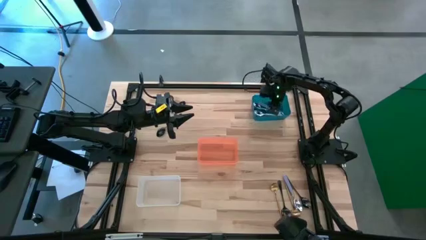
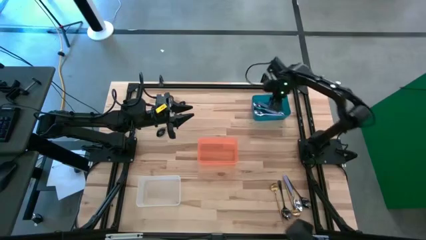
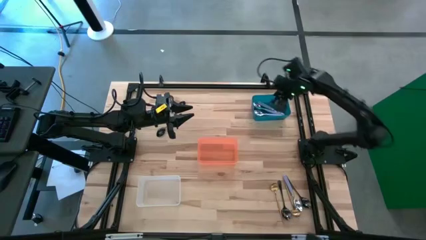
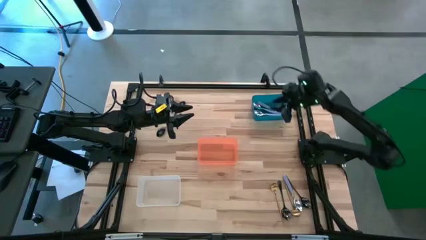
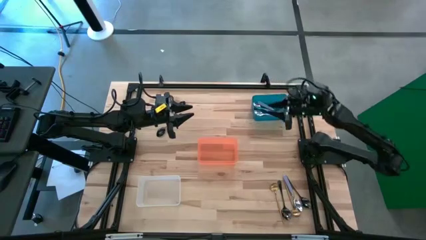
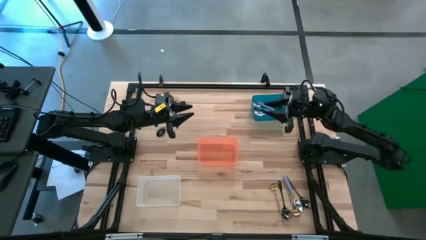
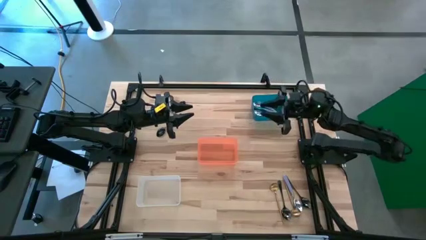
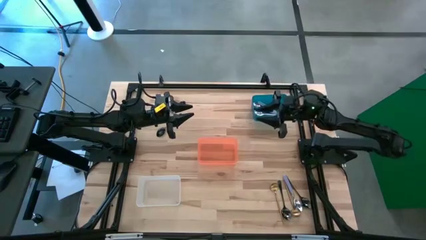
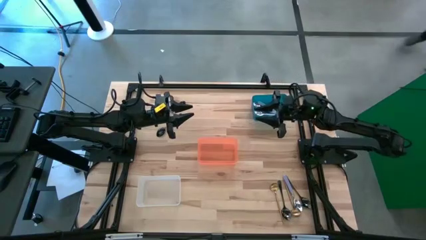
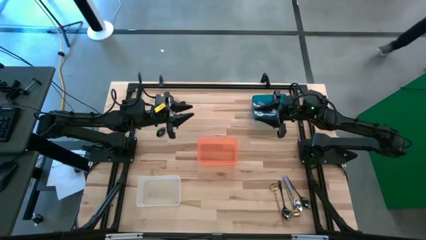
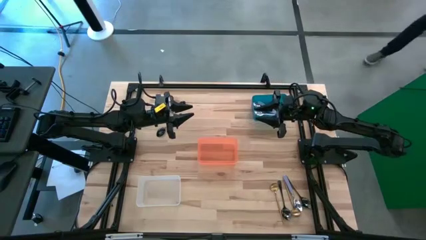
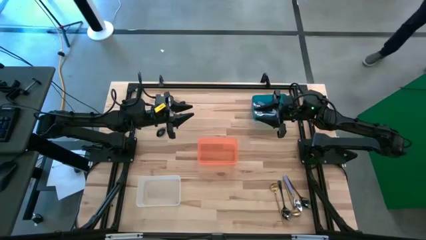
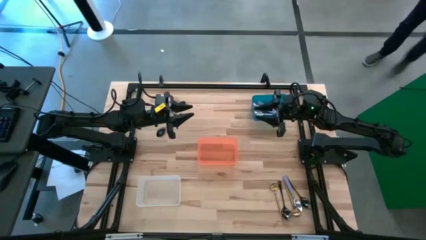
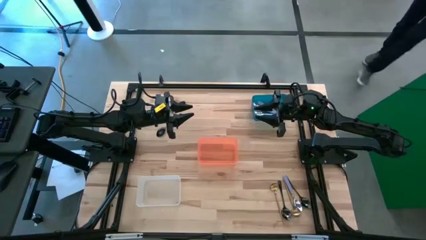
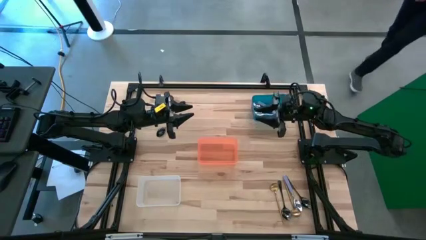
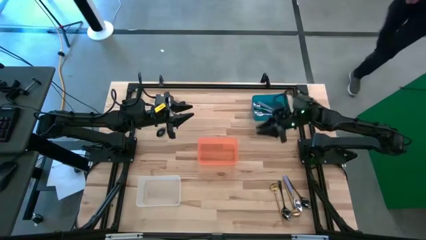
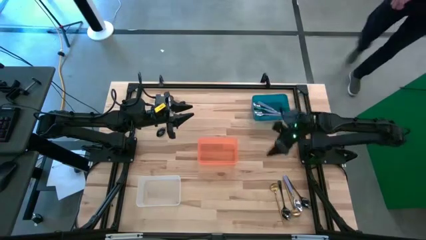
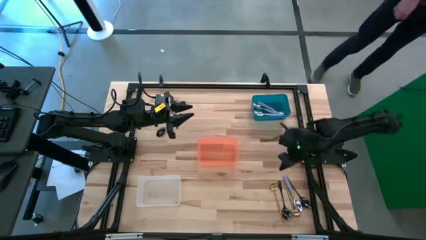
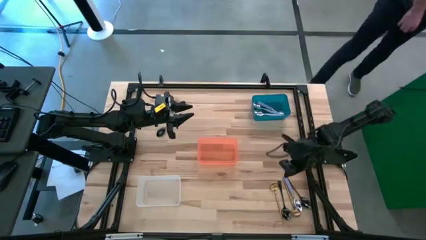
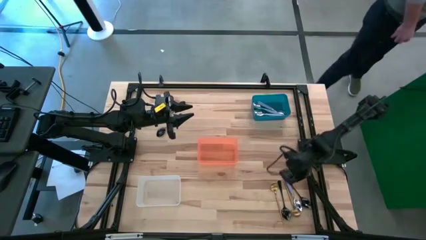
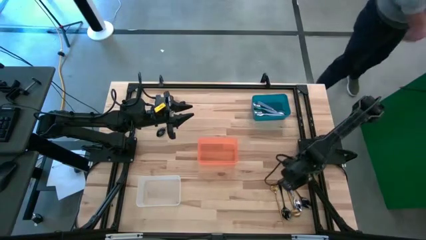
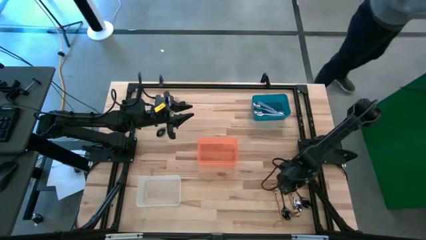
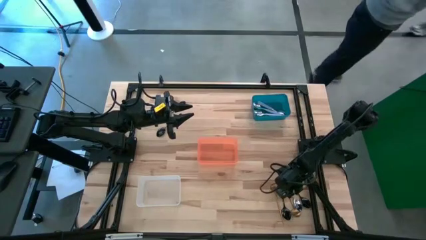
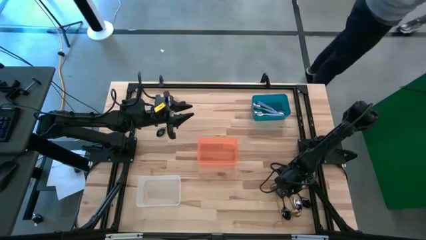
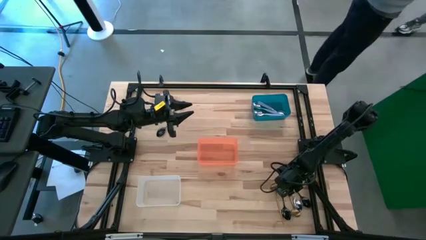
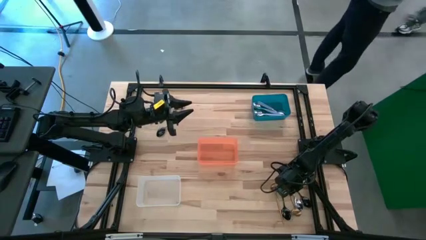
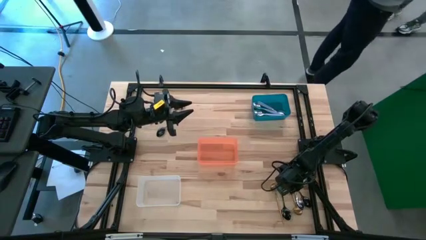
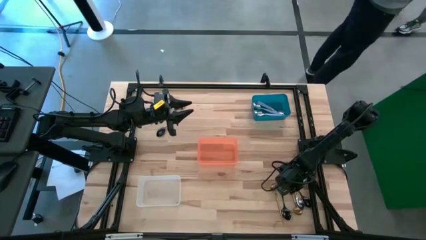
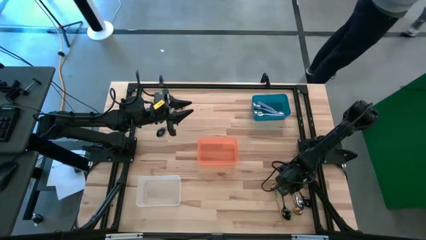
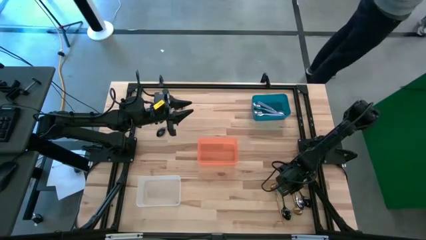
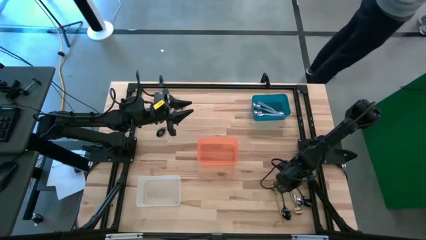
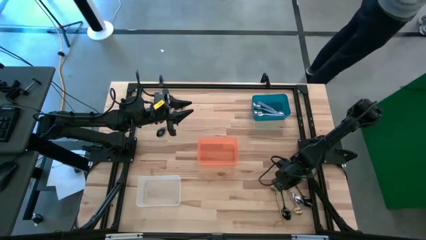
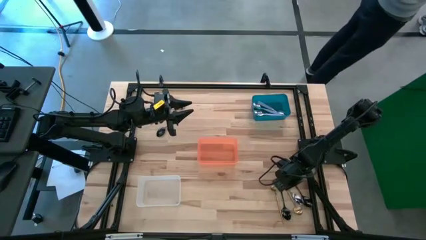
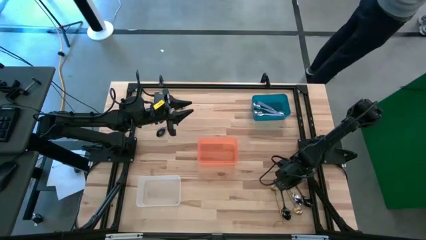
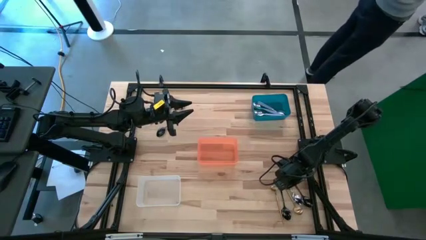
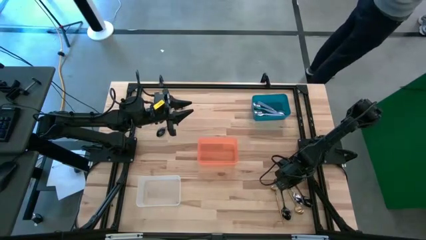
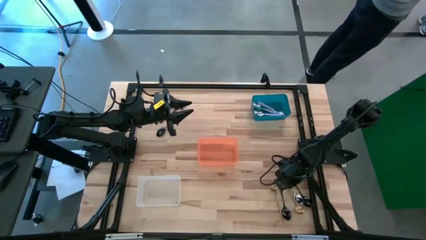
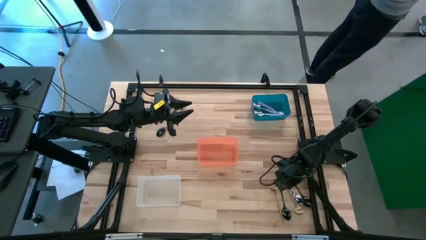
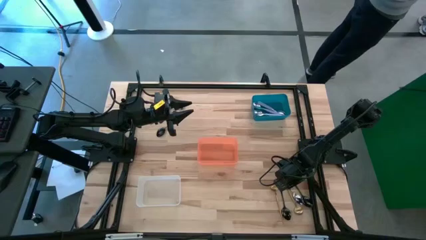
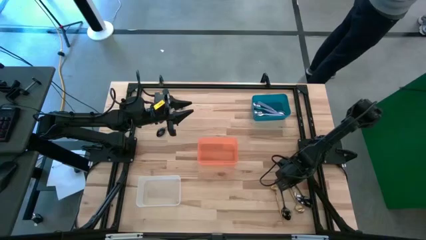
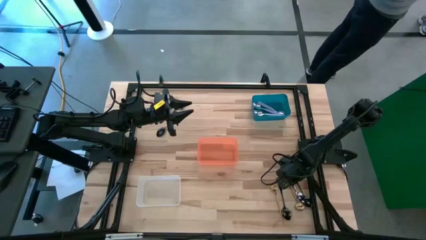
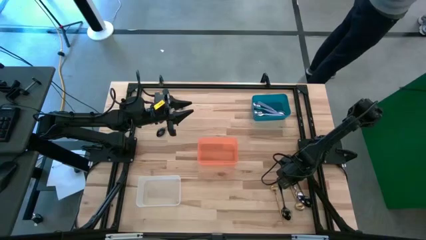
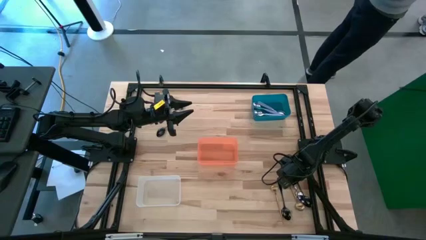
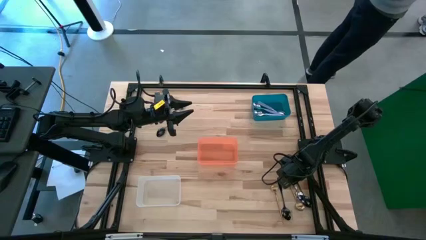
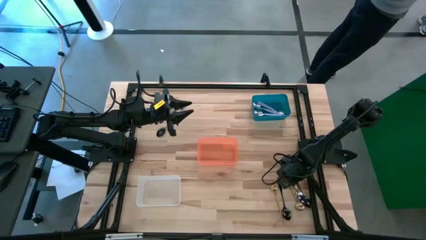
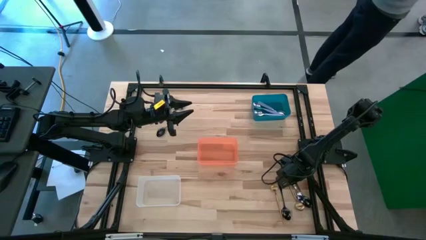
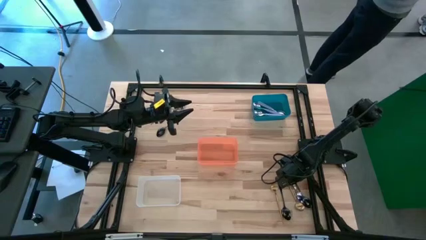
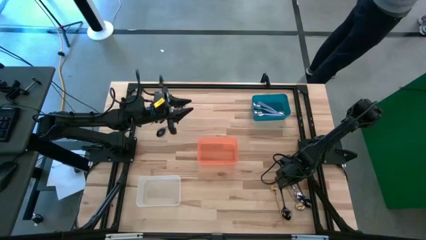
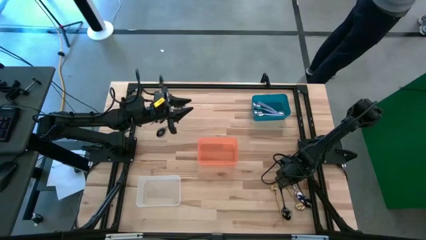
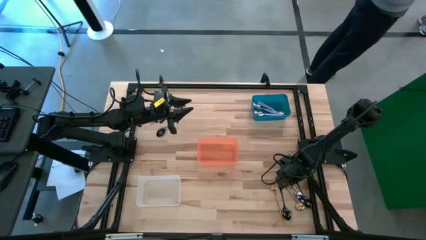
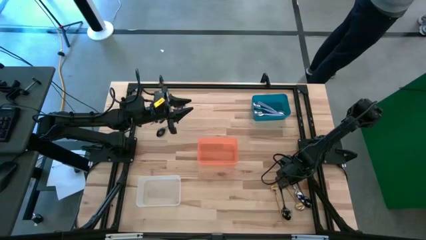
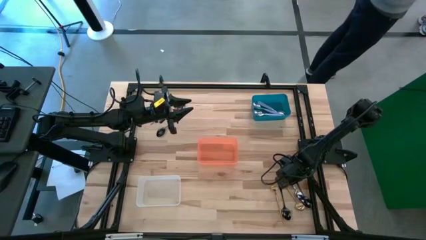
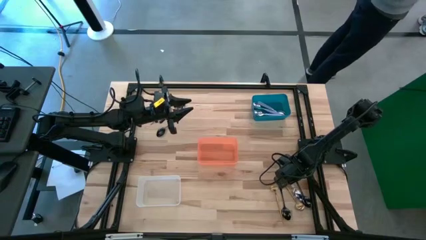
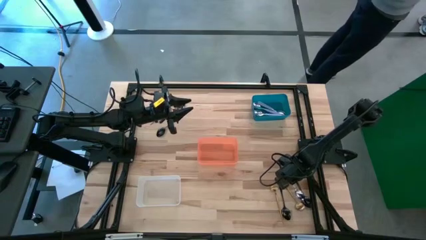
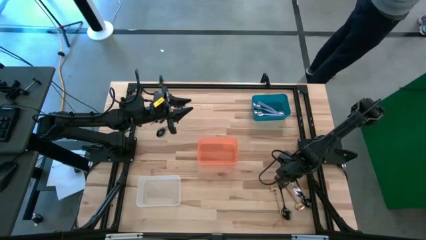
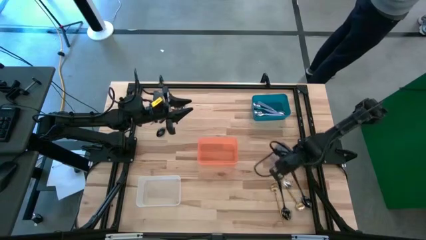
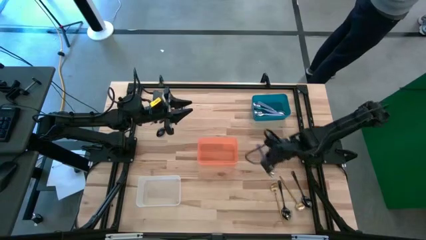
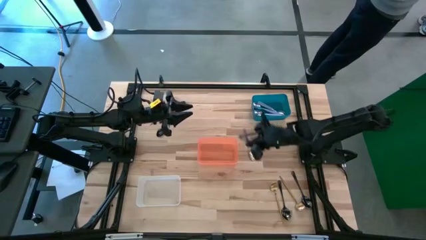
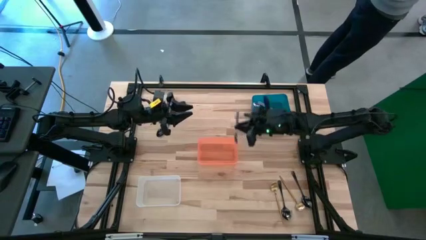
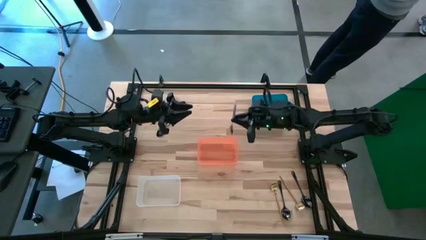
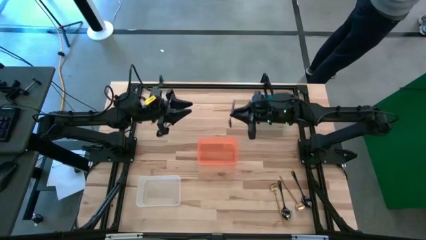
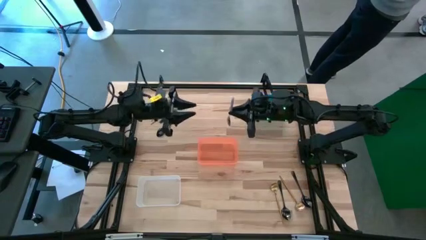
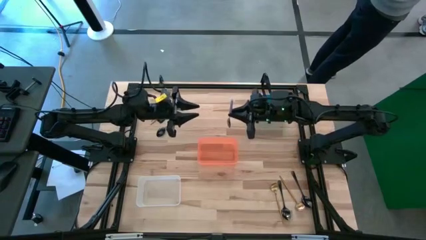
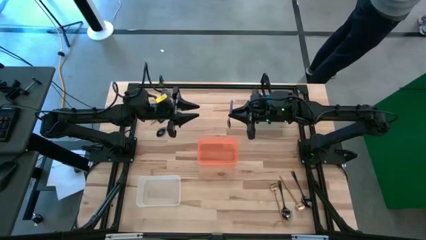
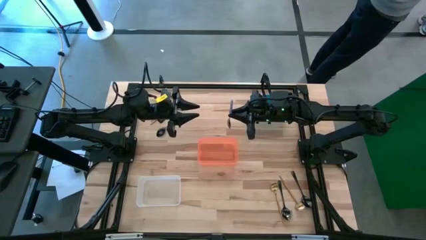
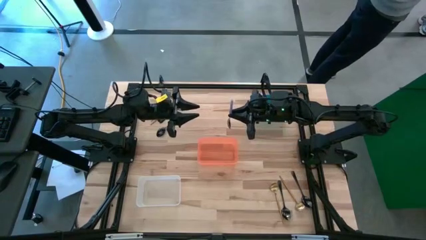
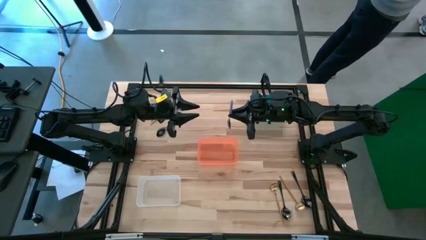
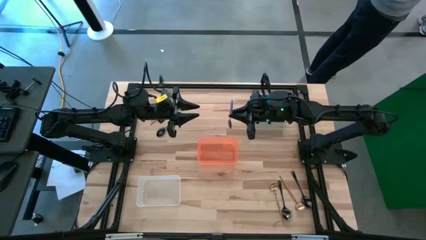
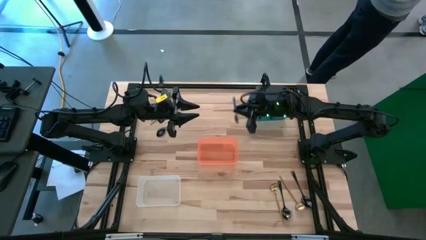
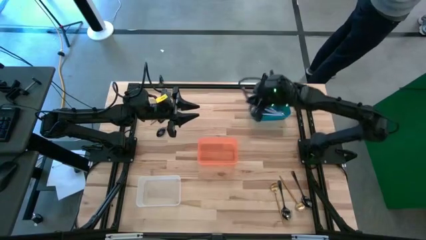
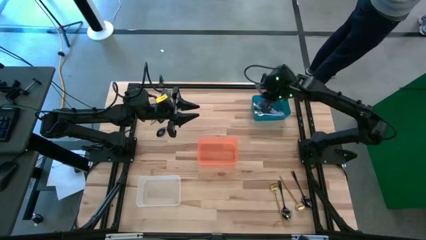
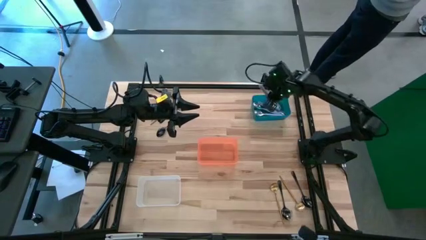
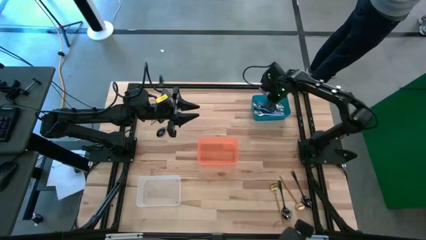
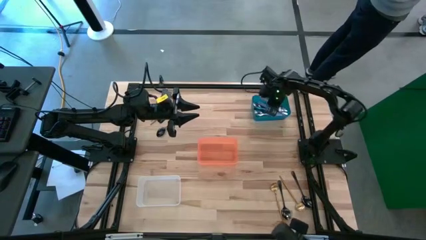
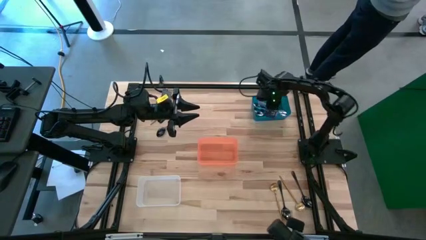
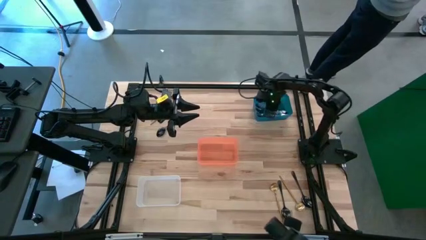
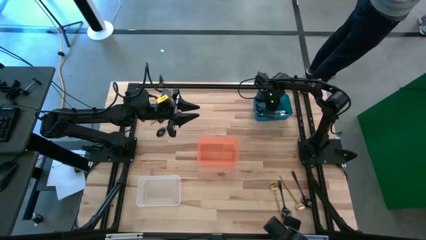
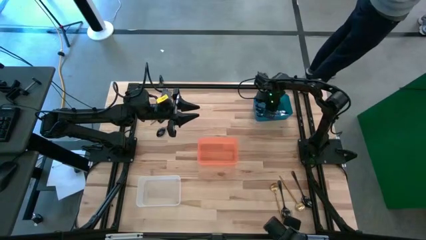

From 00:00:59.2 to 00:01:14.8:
Task: Sort silverware by color (type)
Put the violet spoon into the blue bin

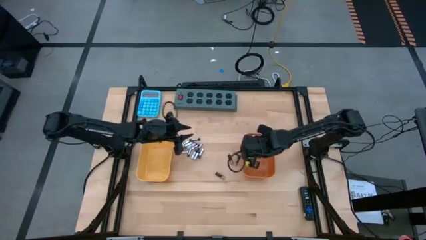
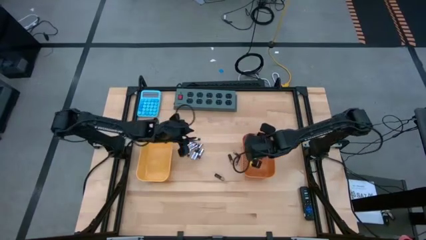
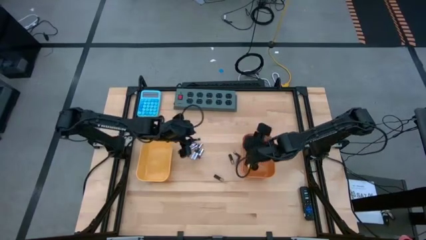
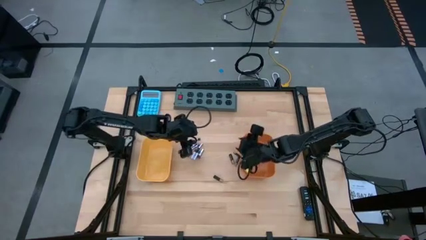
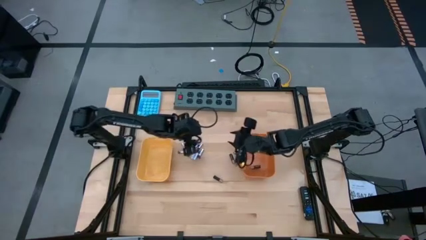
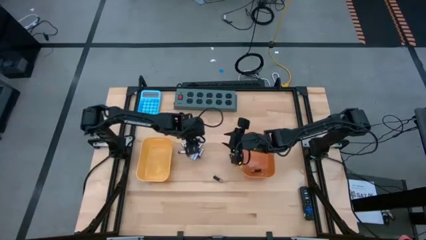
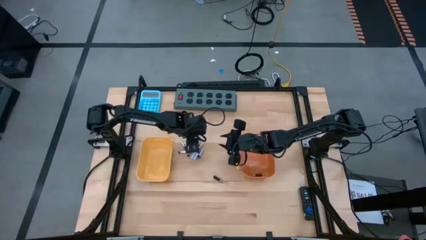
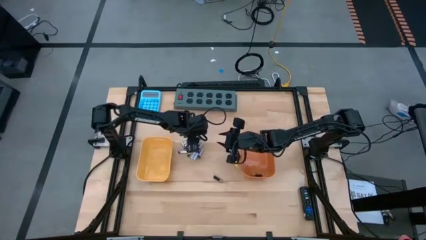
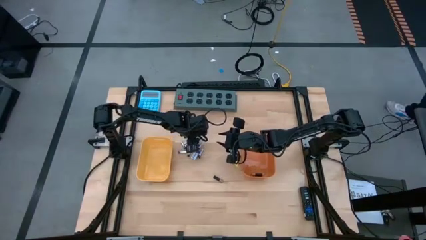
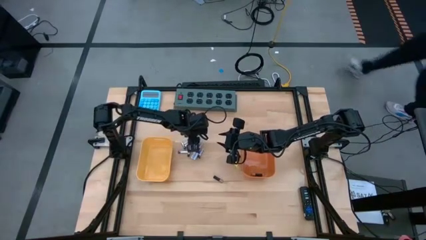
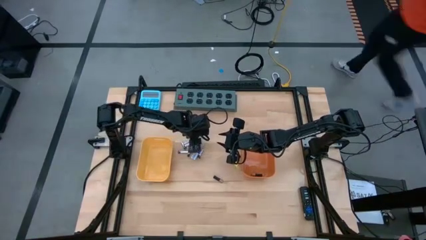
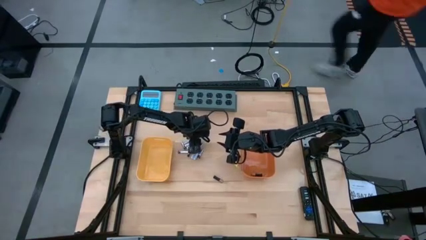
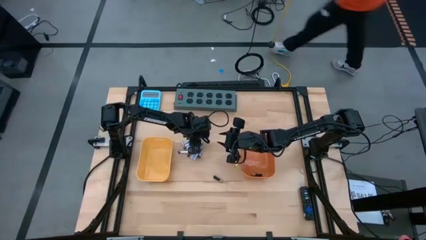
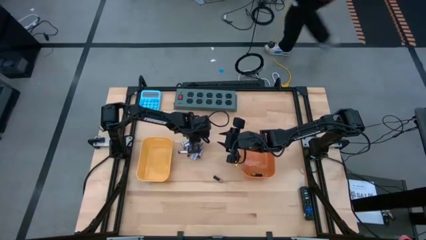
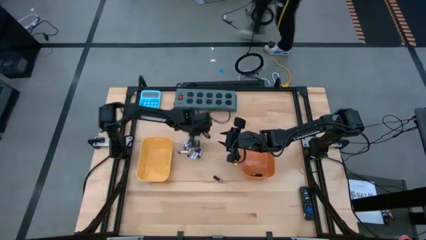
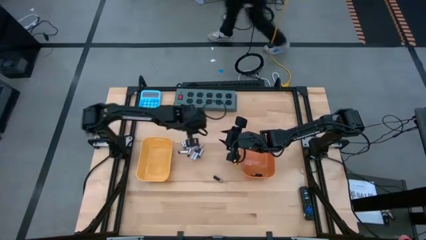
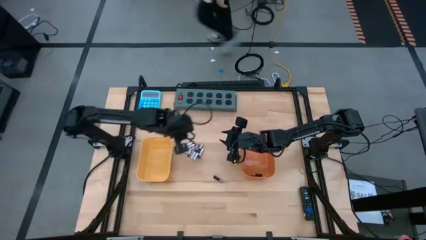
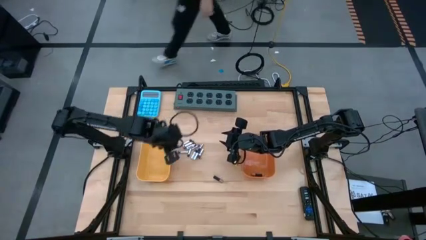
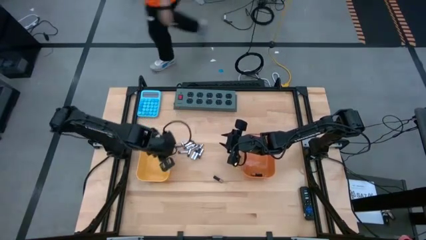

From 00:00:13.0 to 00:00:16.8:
Task: Sort batteries
Put the silver battery into the yellow bin
